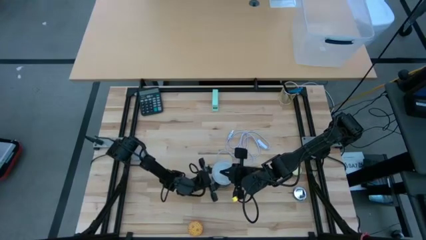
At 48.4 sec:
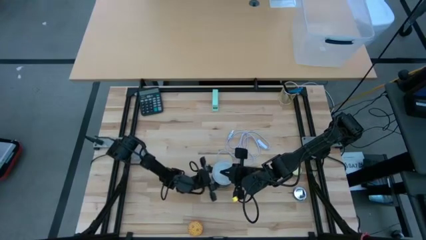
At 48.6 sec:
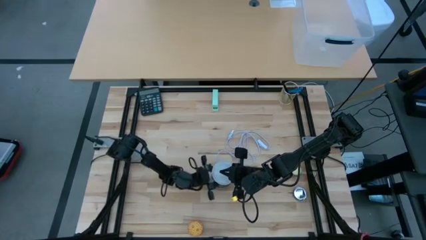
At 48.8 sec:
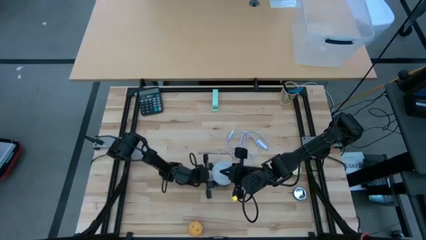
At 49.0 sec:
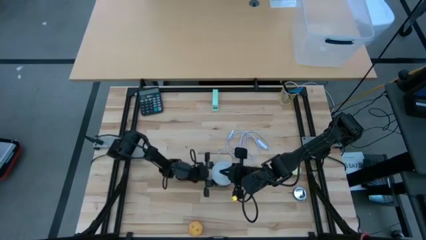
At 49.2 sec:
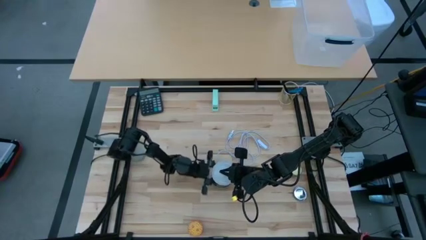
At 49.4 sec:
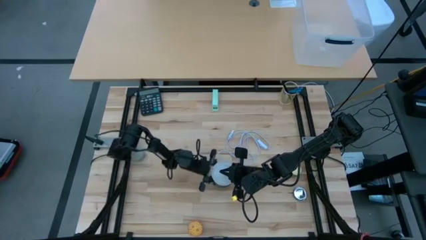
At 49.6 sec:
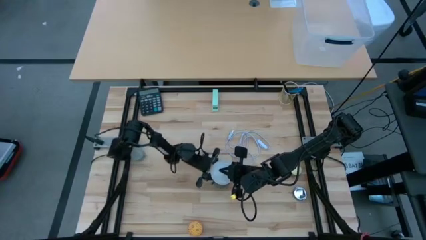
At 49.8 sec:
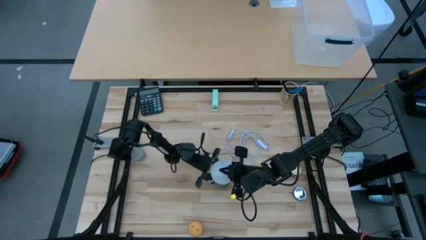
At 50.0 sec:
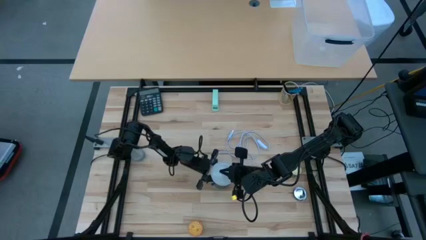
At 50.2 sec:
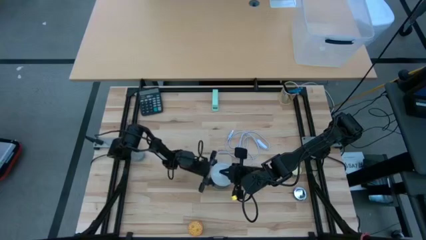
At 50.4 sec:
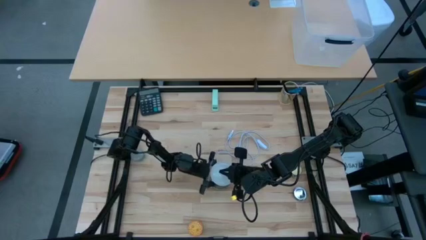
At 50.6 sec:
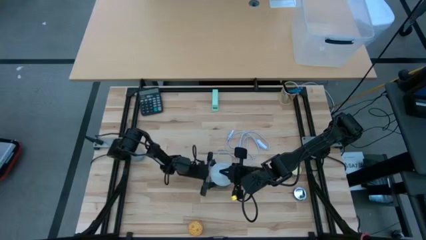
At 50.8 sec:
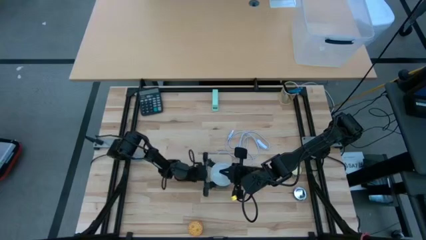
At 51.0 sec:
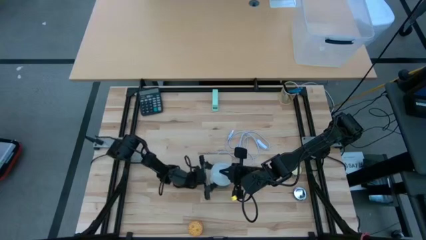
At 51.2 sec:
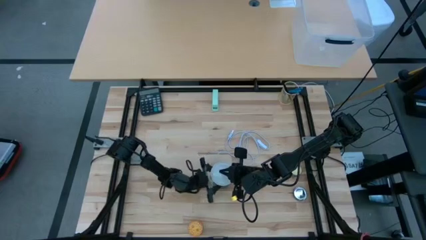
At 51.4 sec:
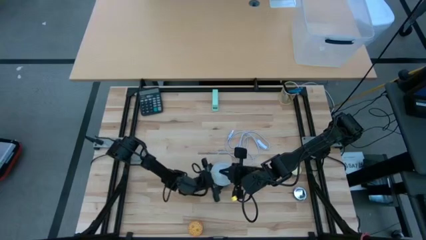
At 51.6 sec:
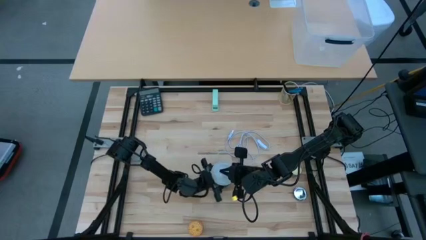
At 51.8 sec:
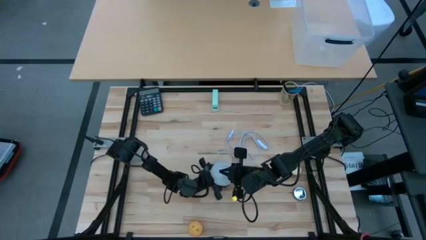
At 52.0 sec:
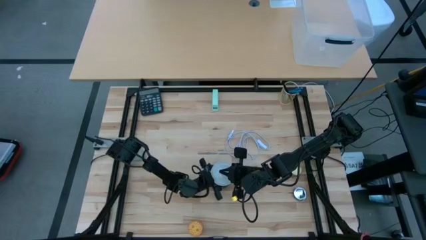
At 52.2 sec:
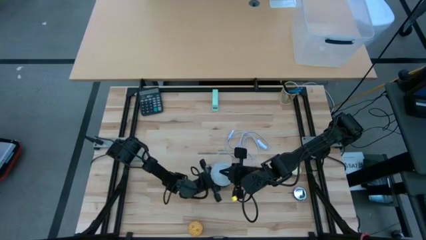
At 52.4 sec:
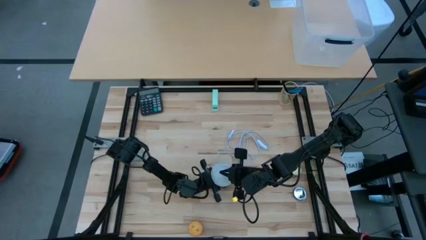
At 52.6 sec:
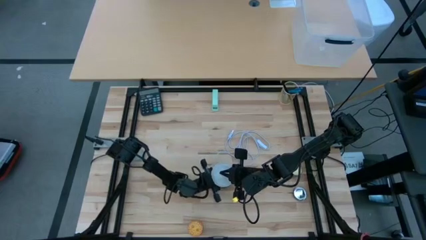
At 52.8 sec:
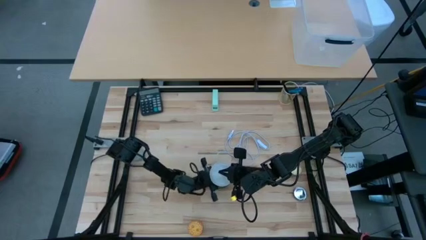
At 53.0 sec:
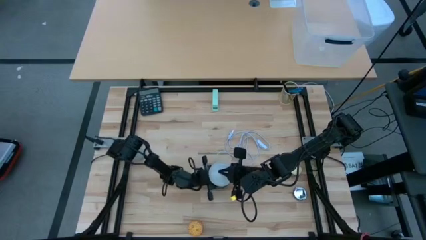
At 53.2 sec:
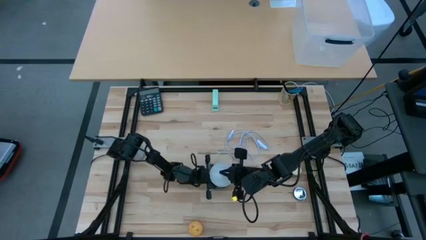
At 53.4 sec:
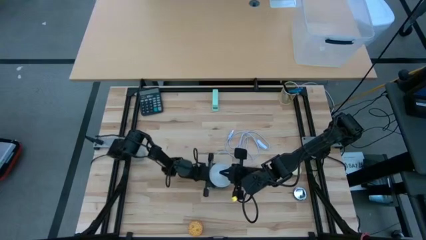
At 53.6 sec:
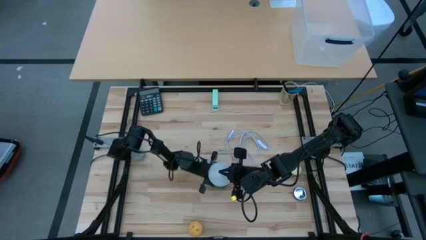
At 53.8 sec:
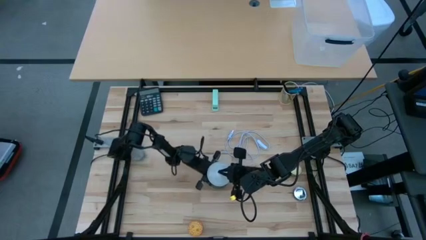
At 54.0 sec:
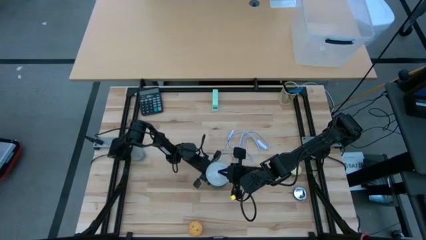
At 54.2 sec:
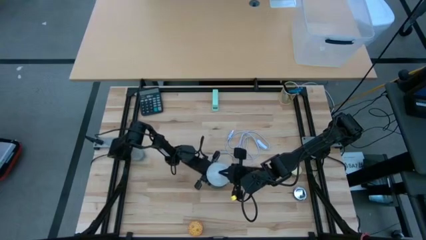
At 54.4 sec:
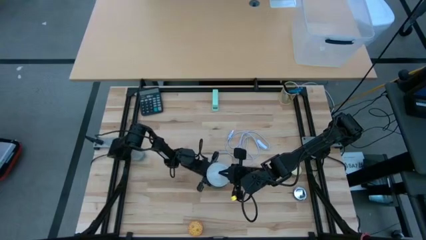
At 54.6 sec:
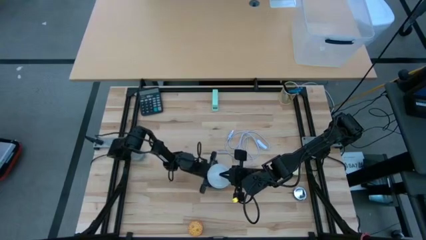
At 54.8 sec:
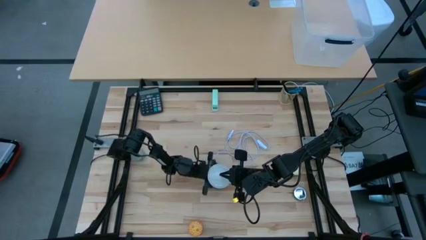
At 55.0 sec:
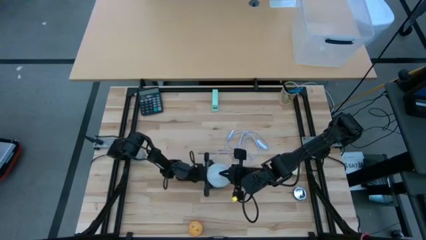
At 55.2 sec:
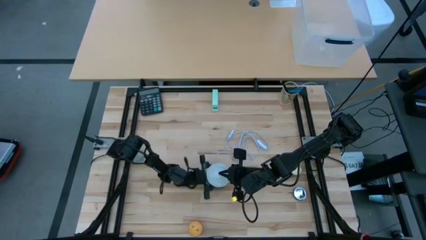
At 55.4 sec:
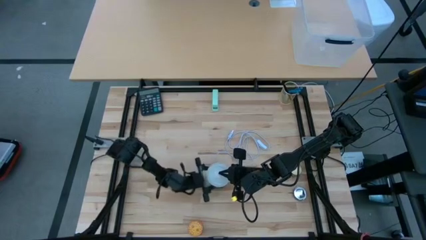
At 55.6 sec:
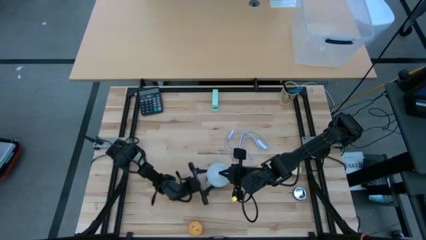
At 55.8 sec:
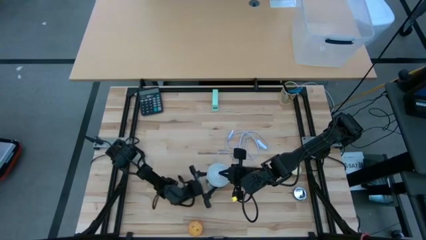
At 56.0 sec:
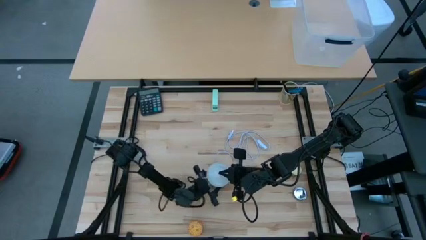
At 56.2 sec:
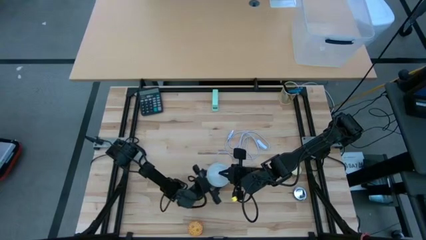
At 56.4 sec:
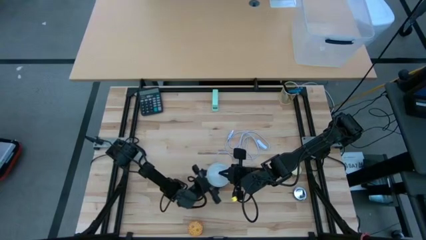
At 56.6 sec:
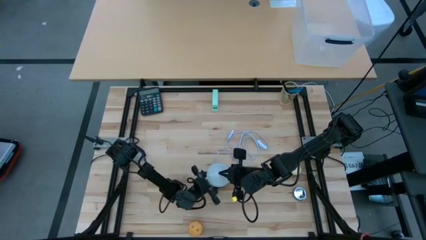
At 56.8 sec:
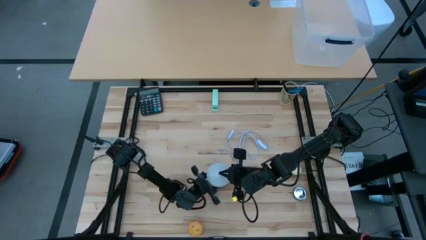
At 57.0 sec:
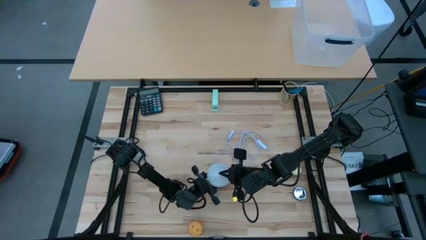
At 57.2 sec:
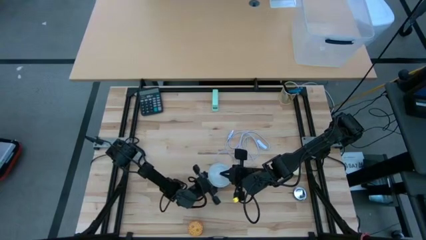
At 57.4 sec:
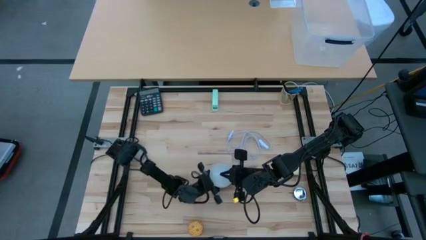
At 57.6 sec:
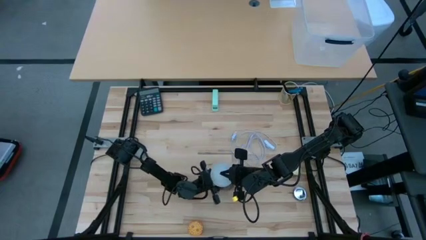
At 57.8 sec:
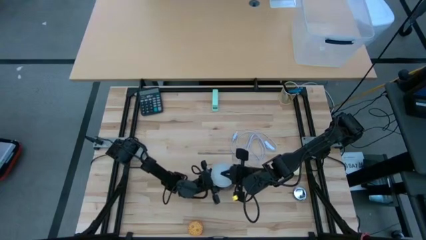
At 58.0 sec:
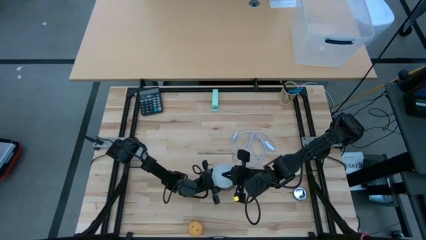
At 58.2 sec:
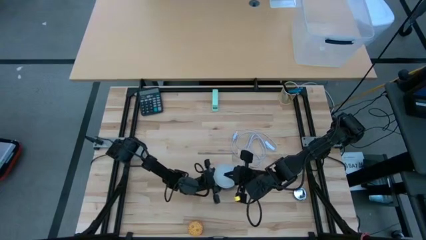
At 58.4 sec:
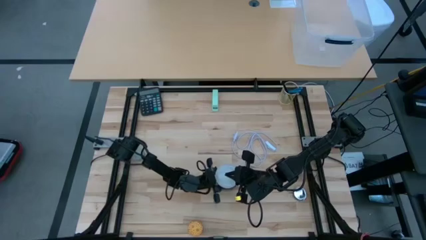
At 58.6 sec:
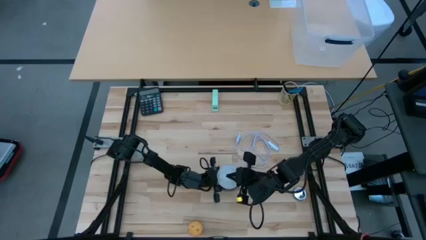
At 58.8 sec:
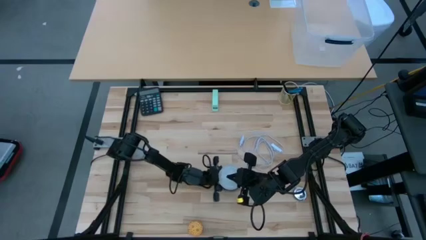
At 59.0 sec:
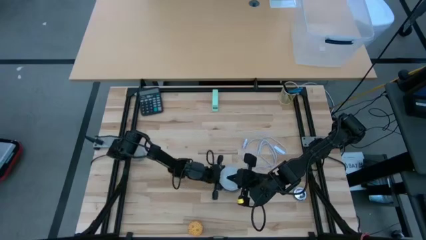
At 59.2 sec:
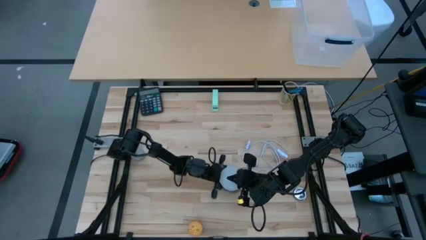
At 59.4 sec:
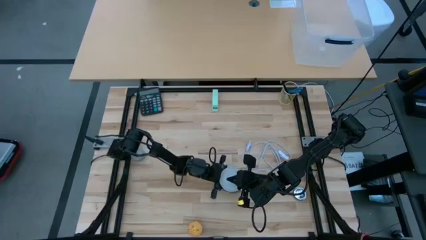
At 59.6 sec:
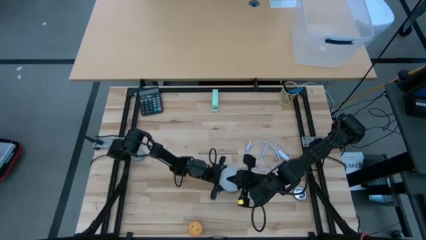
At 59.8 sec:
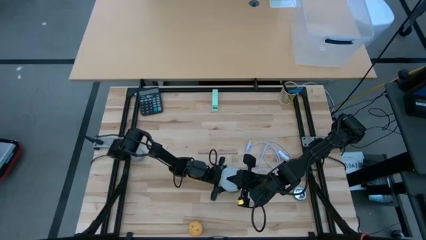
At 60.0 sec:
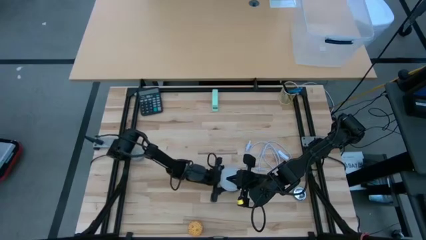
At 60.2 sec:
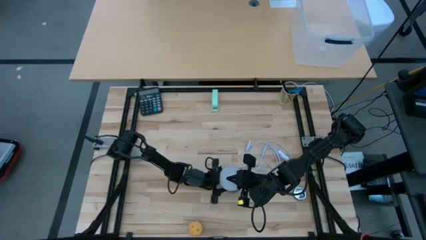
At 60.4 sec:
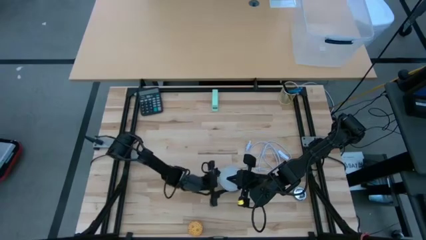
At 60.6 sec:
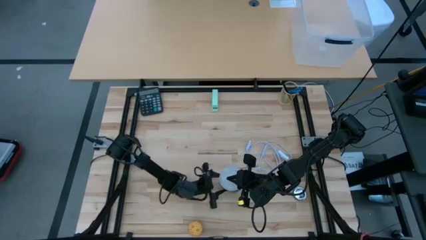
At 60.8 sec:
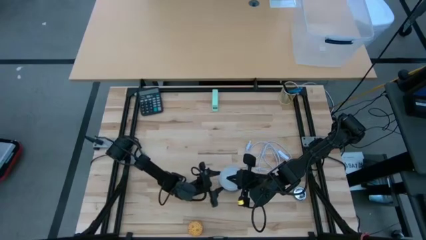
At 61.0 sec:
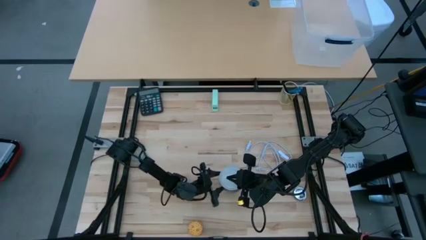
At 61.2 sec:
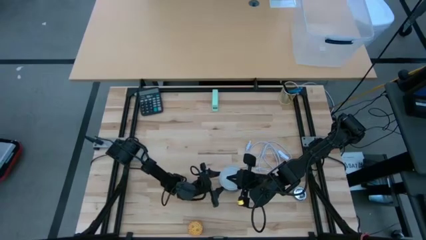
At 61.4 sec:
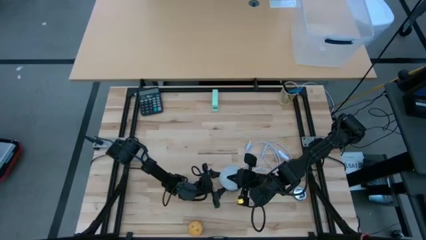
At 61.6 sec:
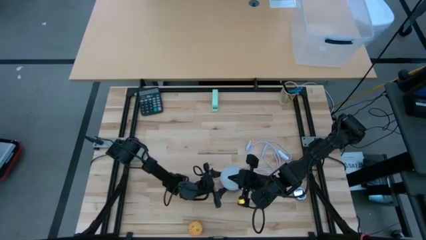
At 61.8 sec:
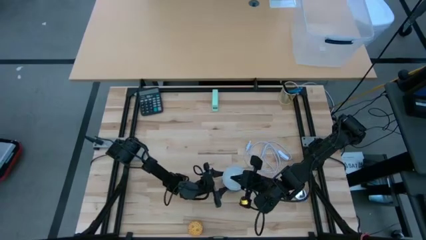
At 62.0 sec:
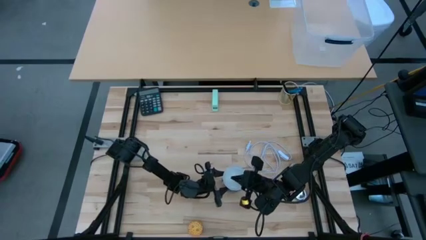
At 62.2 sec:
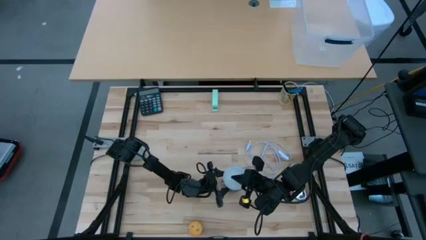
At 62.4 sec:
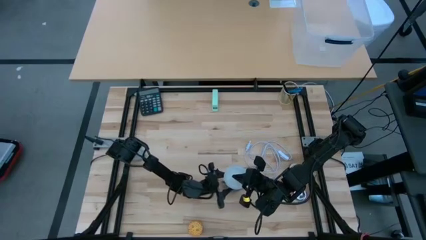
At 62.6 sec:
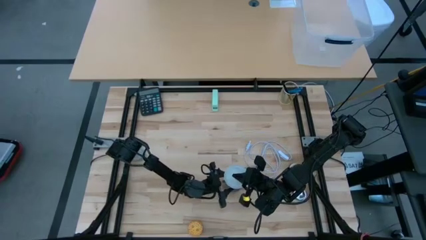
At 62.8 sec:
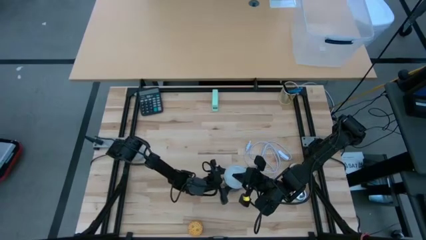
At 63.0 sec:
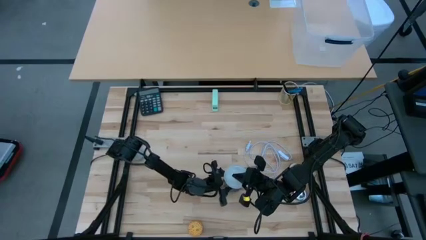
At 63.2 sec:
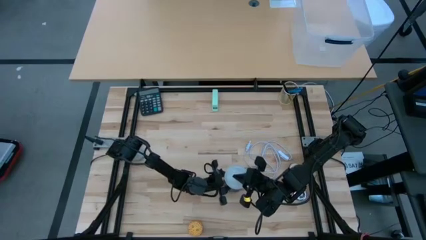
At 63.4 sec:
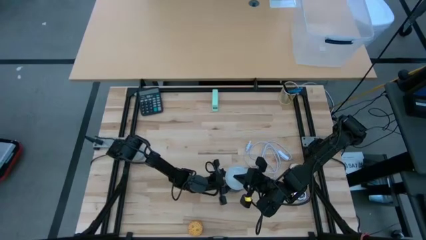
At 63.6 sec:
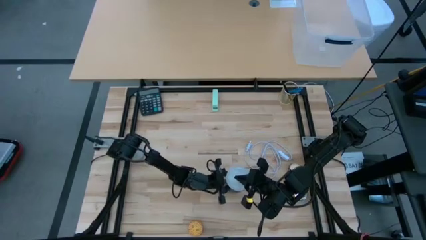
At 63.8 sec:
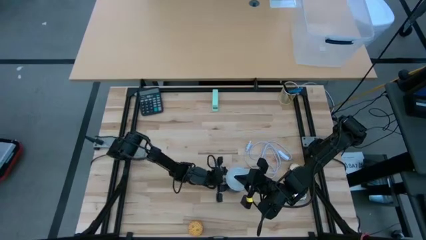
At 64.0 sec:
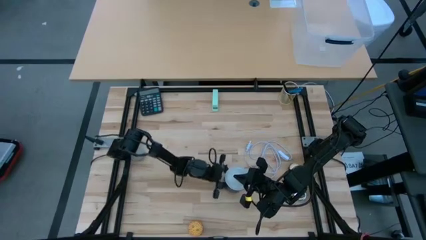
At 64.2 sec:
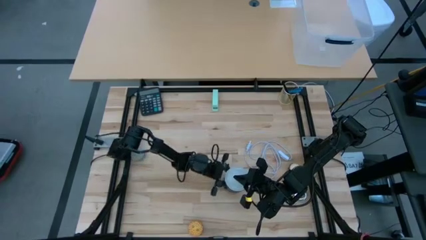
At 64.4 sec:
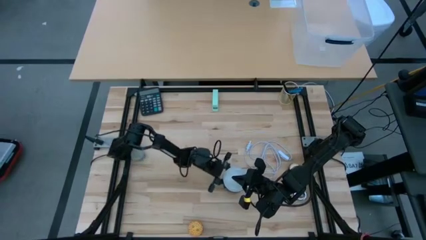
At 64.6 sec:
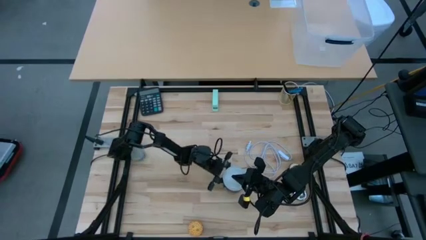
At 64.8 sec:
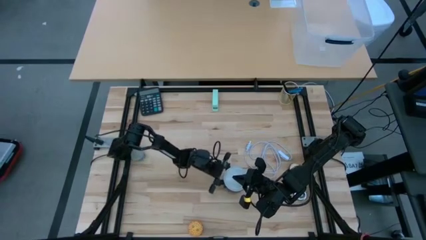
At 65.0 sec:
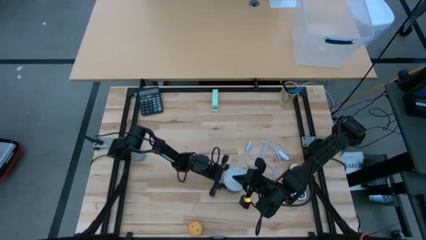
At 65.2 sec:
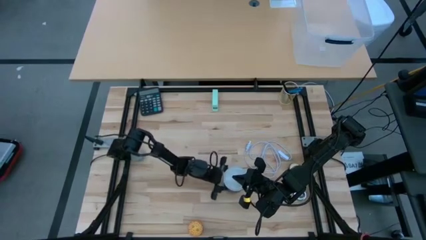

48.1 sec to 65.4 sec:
Task: Screw lightbulb
Insert the white lightbulb into the silver lamp
